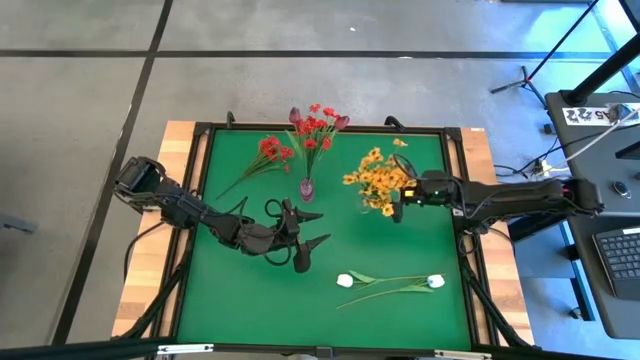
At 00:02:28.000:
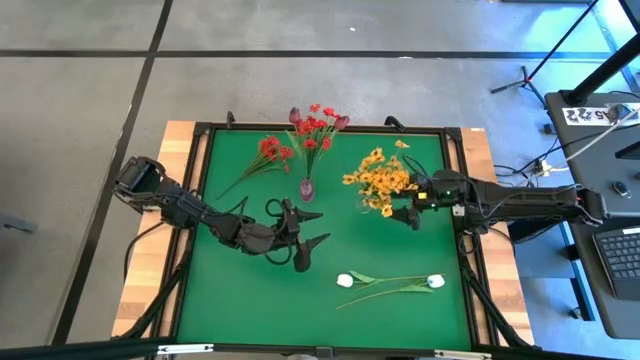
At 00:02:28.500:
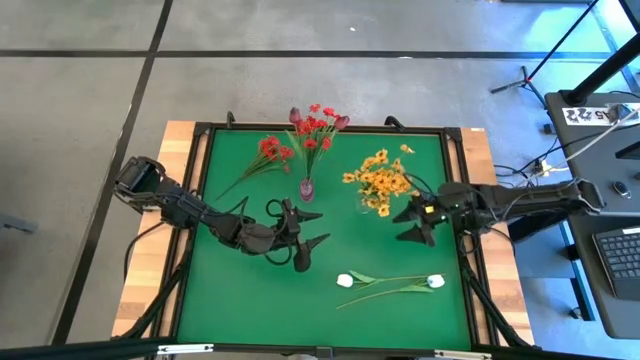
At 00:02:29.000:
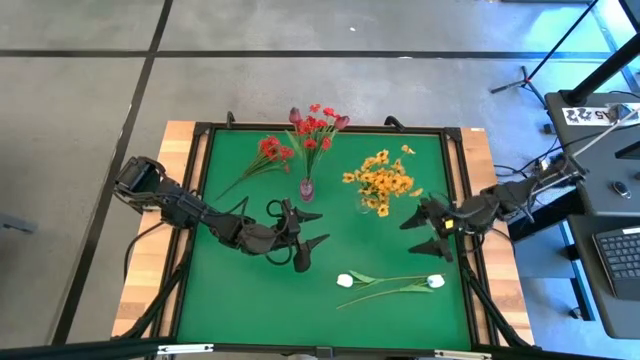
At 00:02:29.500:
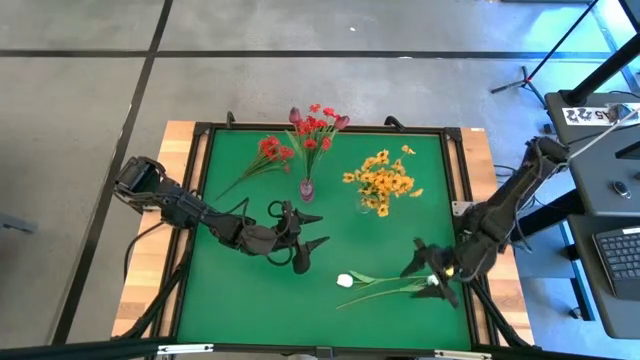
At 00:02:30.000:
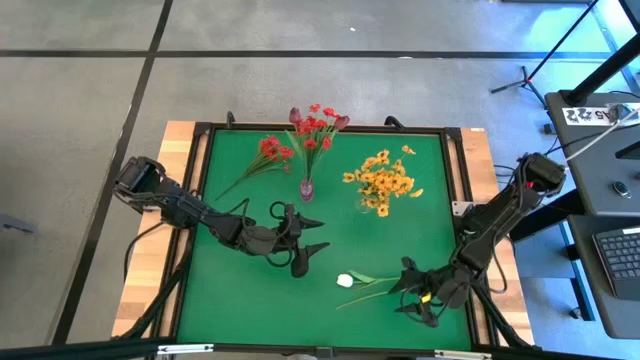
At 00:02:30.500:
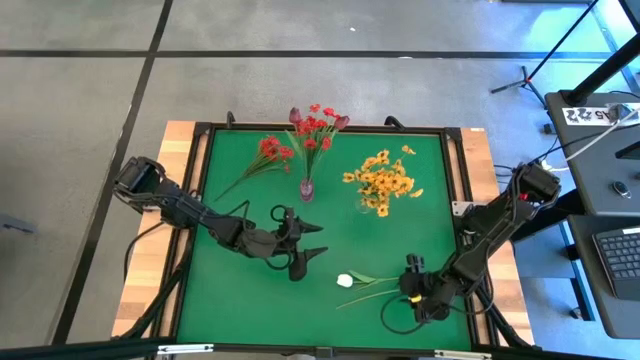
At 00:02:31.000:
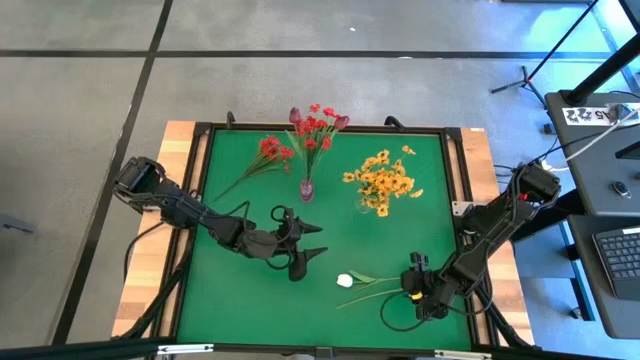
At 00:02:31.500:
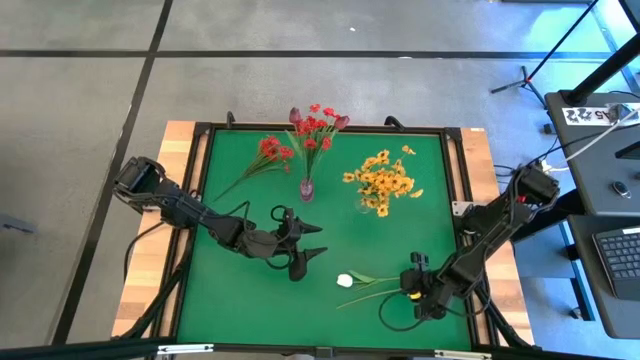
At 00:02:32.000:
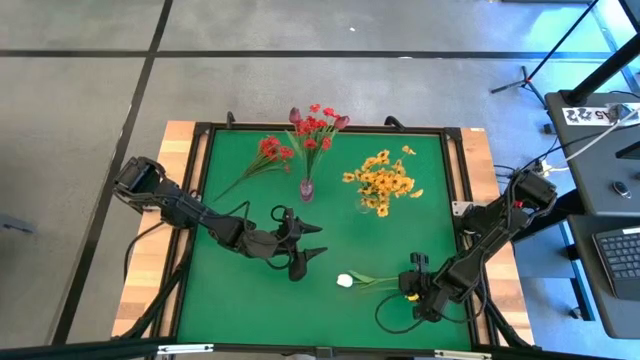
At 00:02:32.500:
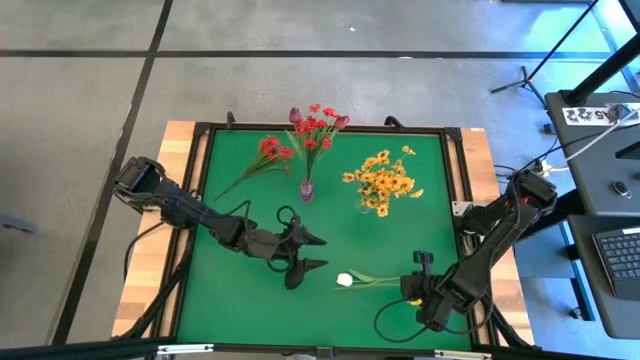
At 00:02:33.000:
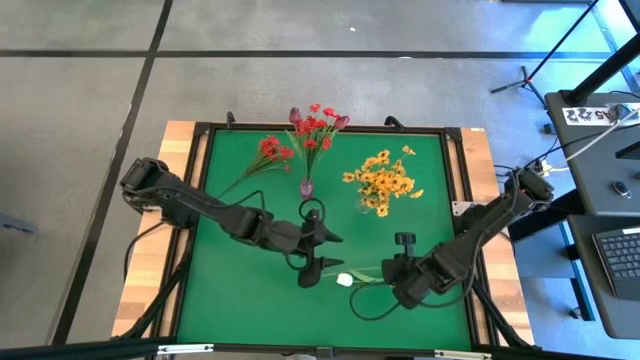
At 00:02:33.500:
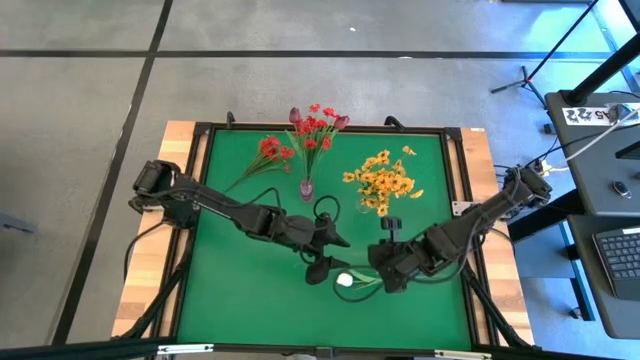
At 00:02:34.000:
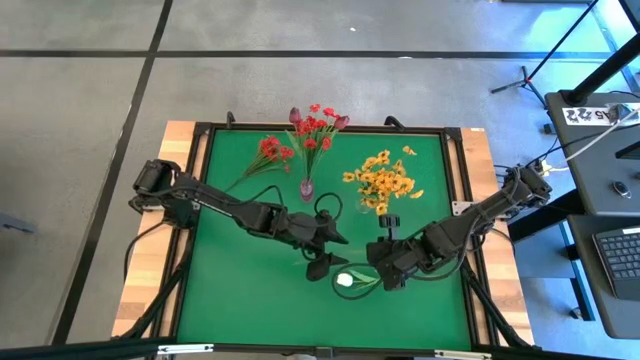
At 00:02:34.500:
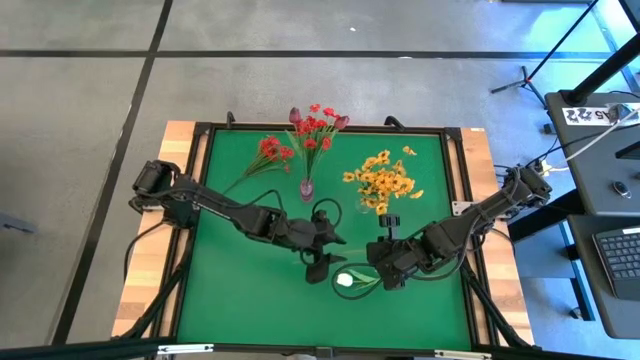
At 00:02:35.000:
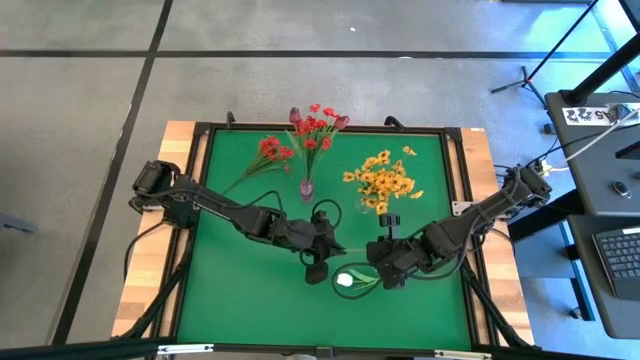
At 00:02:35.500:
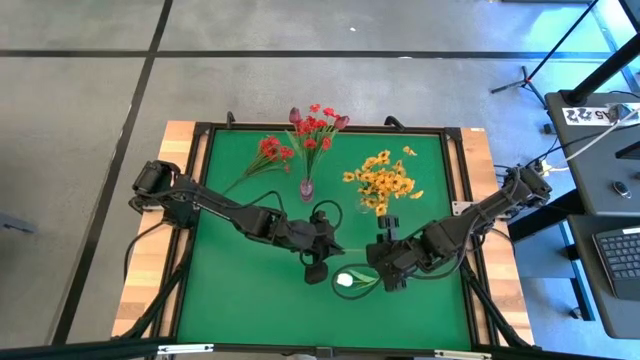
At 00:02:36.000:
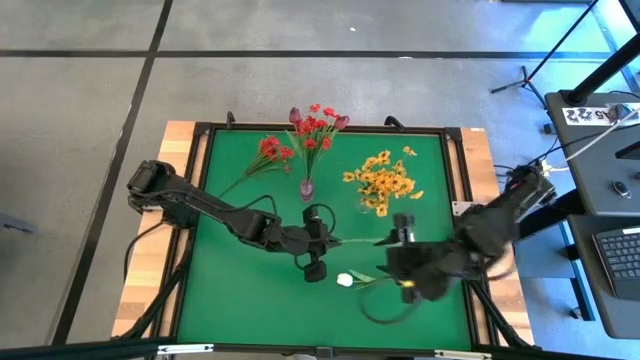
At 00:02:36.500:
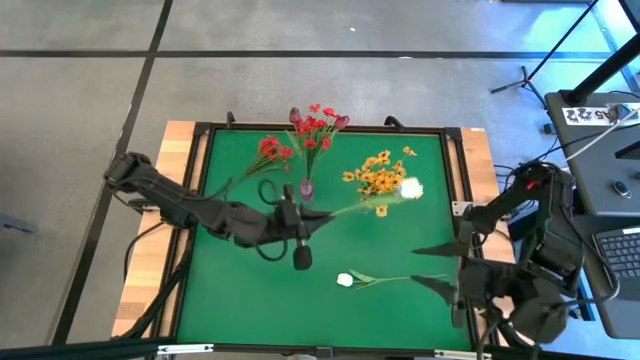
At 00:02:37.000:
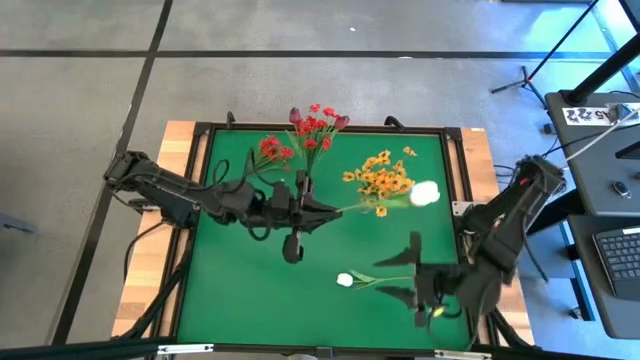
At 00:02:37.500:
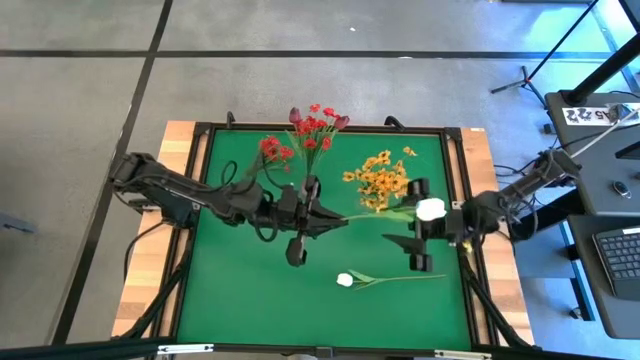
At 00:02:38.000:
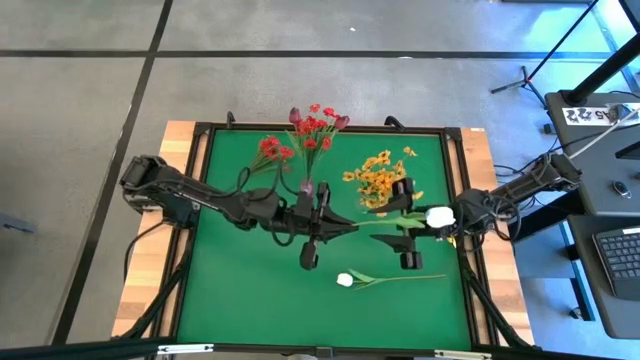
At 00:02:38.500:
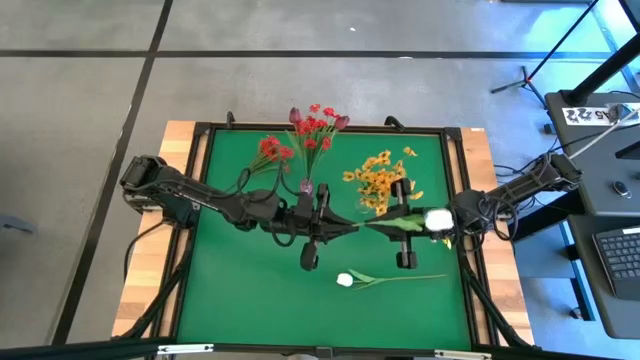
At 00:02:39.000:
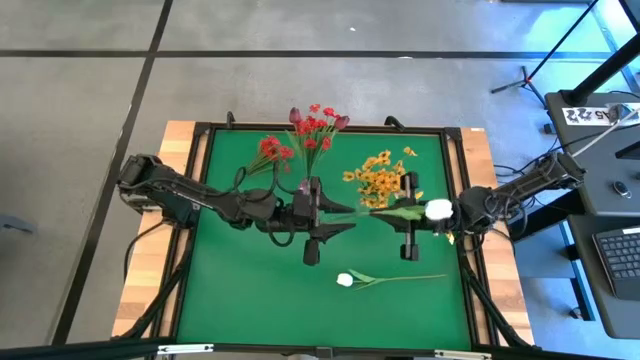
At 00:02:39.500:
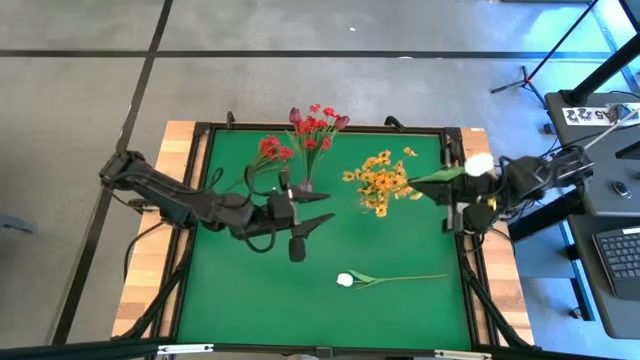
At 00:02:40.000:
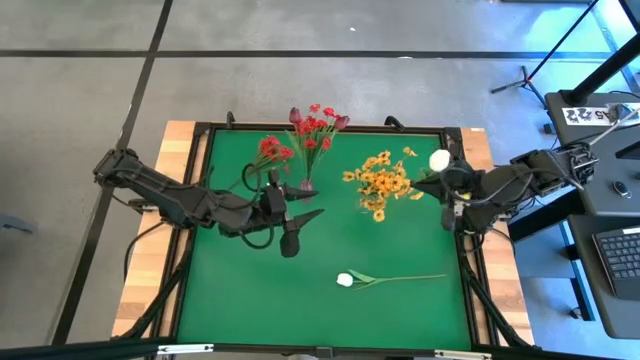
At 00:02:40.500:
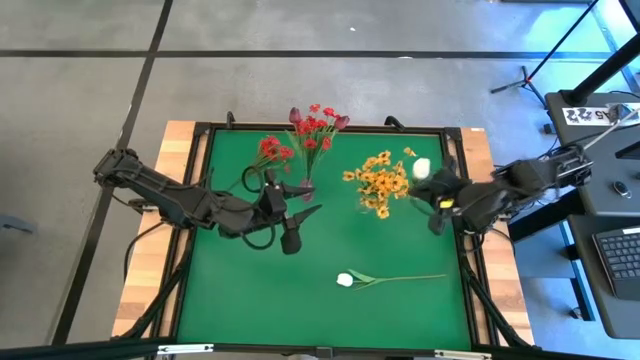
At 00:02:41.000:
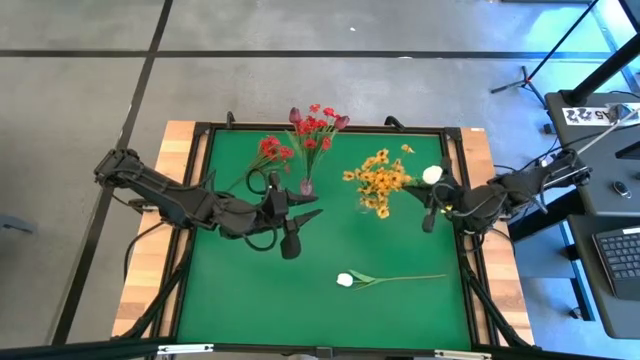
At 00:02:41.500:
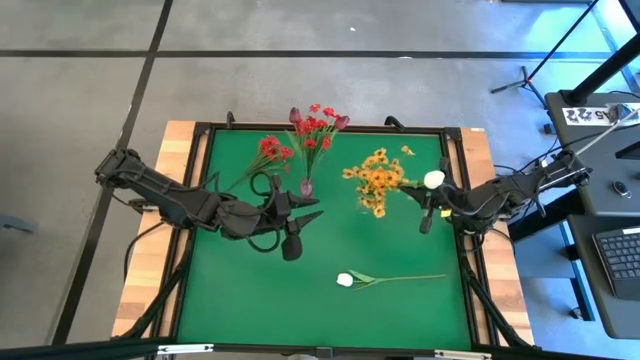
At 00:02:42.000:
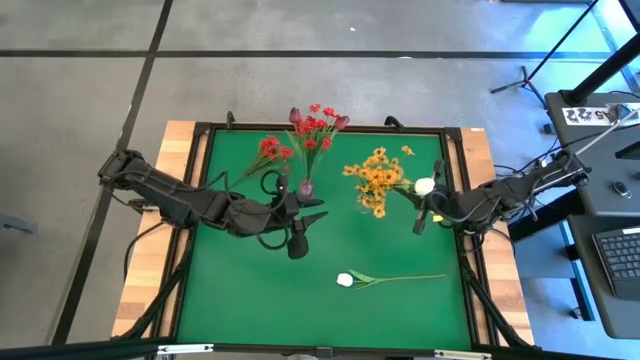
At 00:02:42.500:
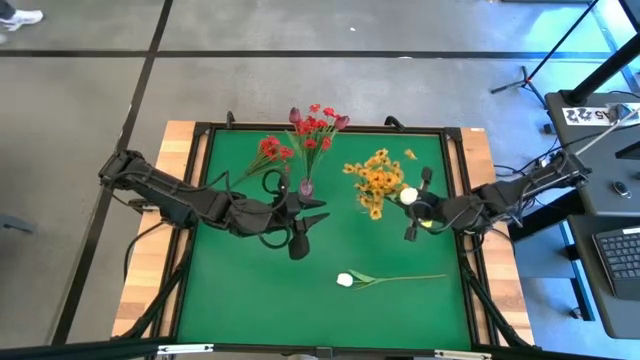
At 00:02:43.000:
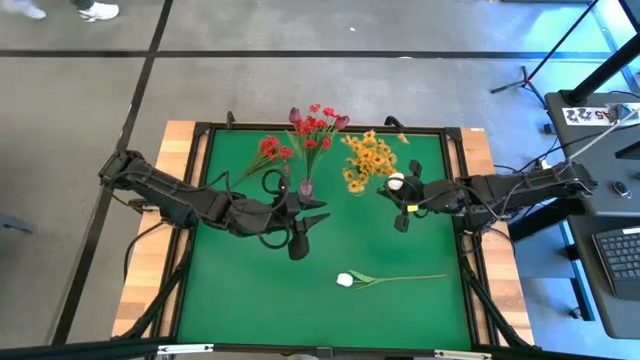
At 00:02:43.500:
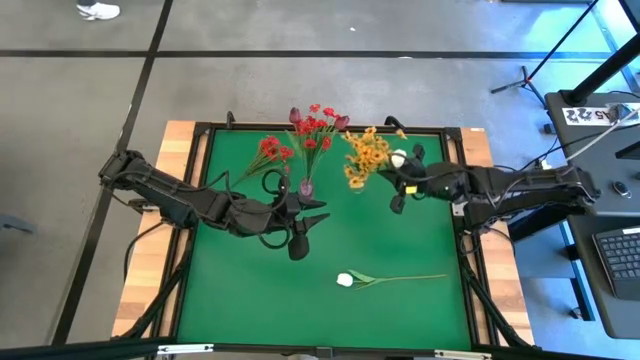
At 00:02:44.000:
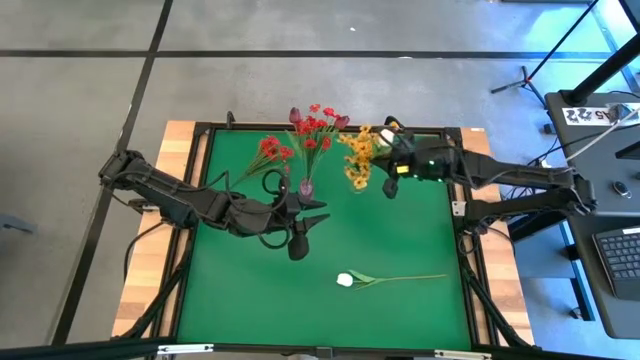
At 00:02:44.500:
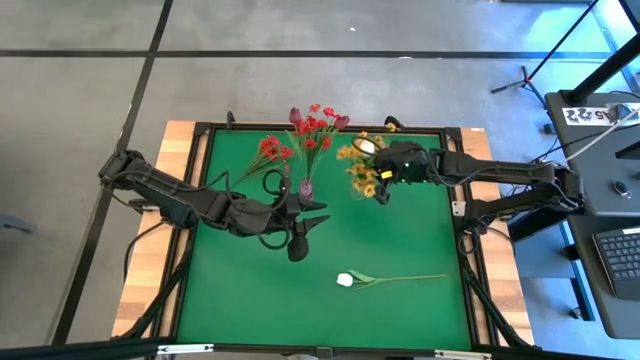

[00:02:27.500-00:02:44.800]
Task: Sort flowers into vase by color
Put the bottom white tulips into the transparent vase

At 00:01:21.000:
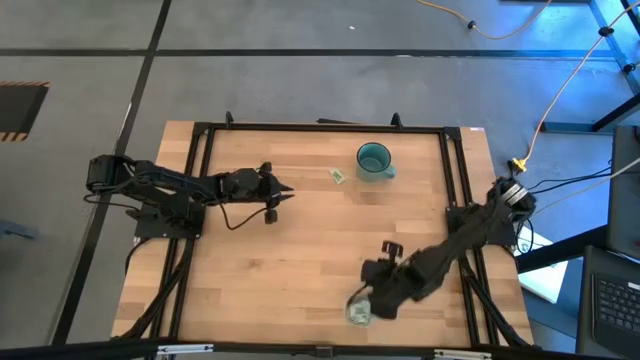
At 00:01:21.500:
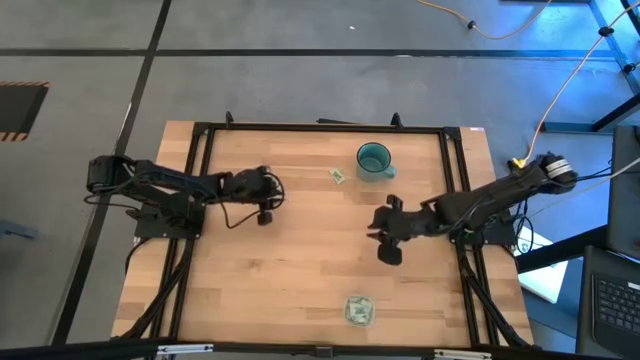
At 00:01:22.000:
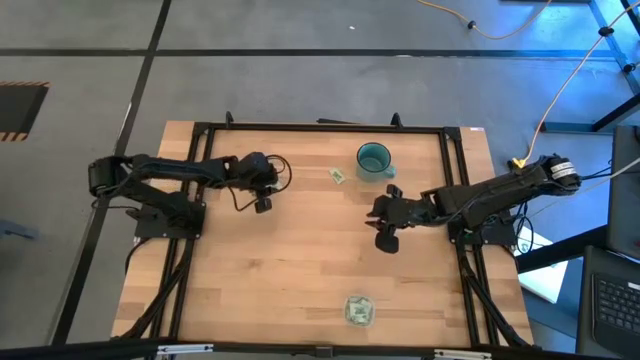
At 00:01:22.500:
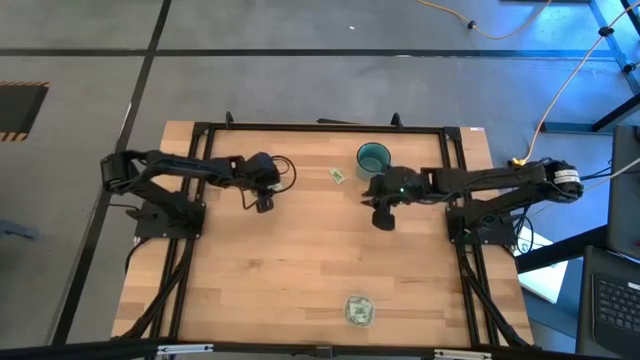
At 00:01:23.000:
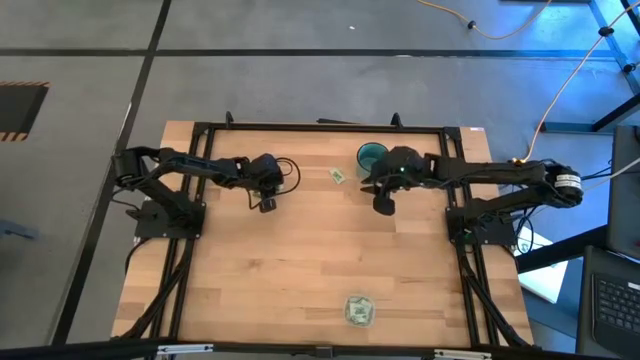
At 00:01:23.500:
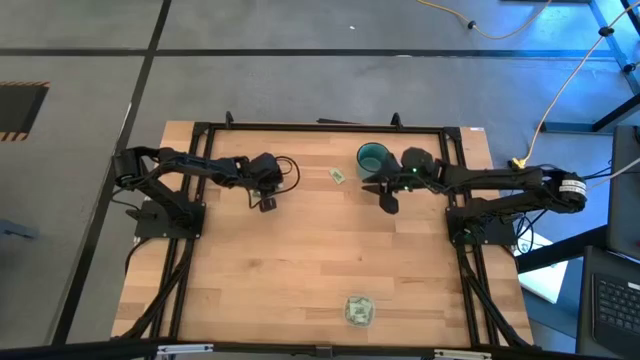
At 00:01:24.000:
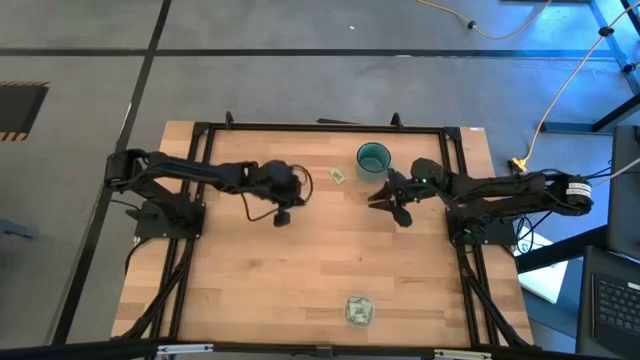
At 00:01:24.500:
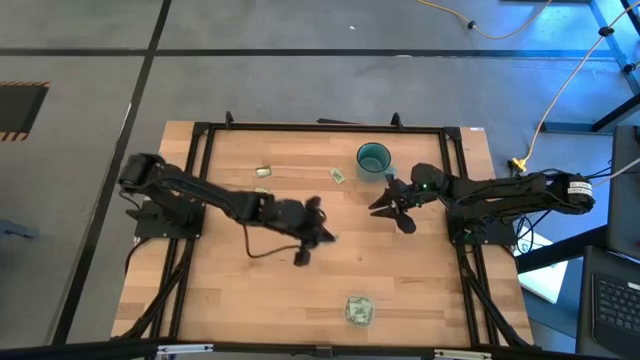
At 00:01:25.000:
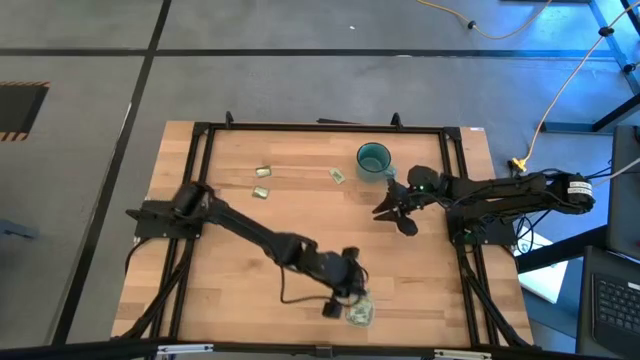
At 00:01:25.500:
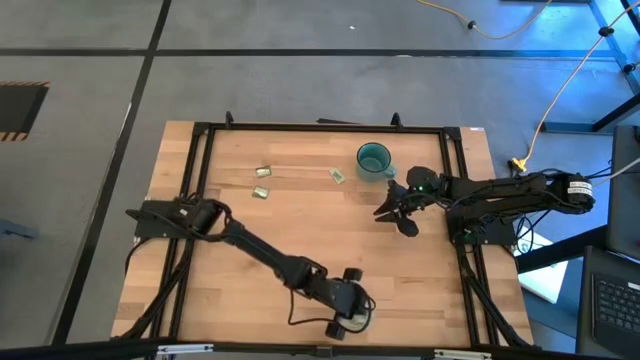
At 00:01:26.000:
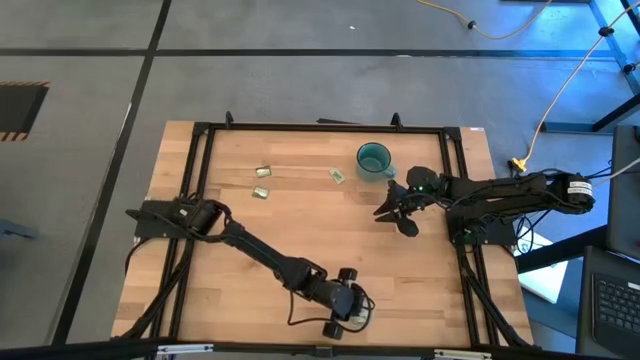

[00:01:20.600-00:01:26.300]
Task: Pick and place items into bin
Put the light green stevia packet into the transparent bin
